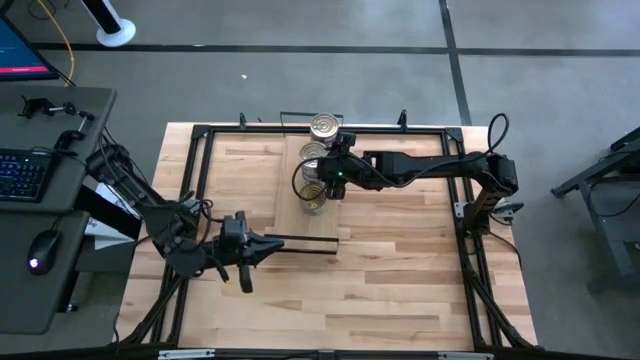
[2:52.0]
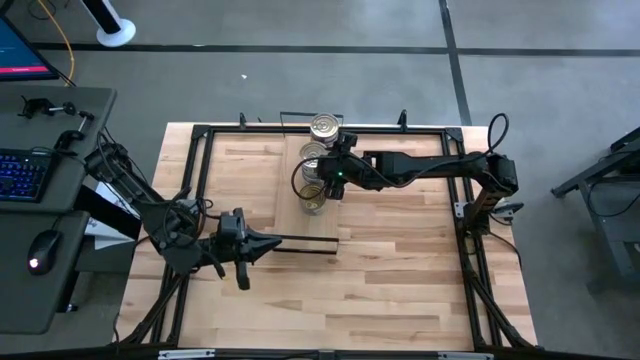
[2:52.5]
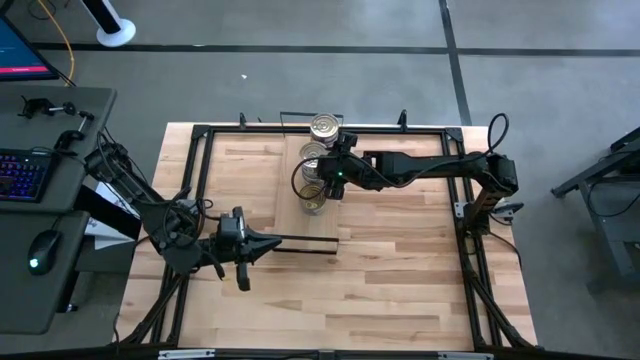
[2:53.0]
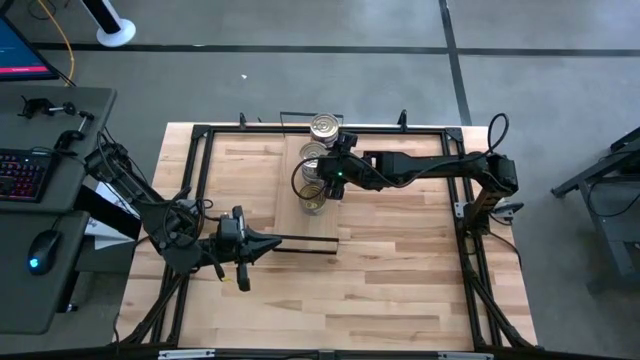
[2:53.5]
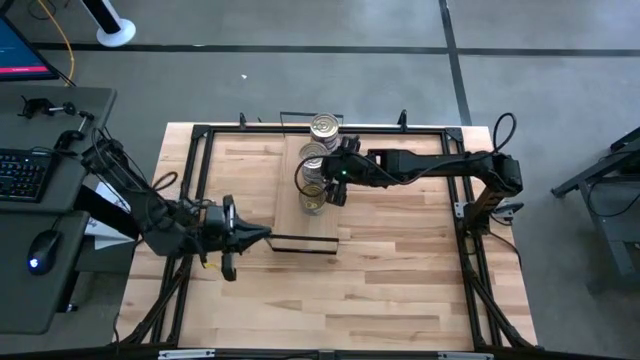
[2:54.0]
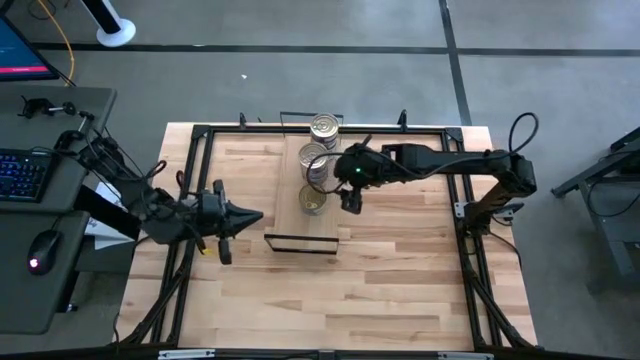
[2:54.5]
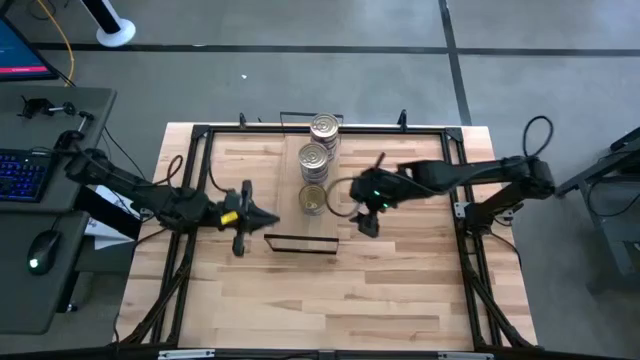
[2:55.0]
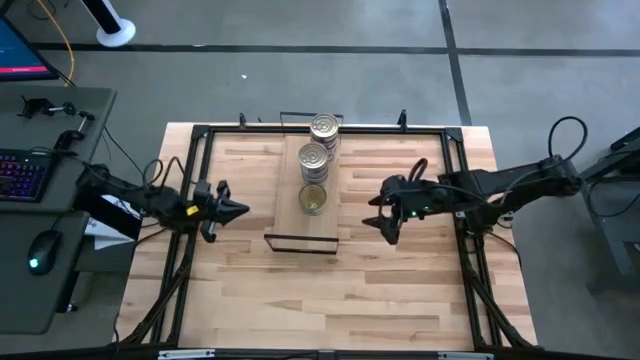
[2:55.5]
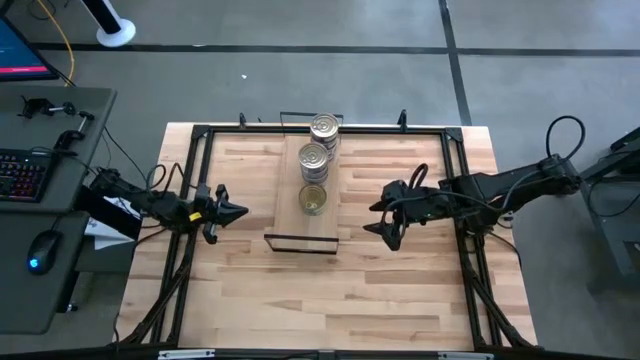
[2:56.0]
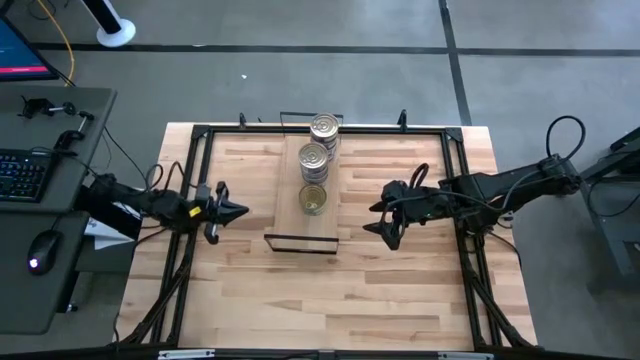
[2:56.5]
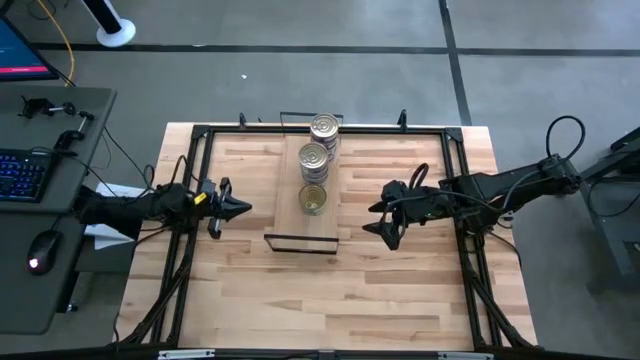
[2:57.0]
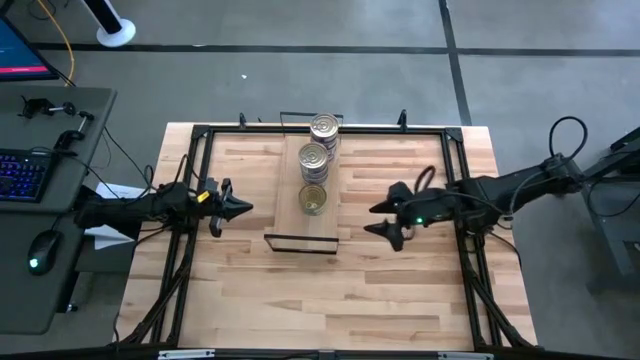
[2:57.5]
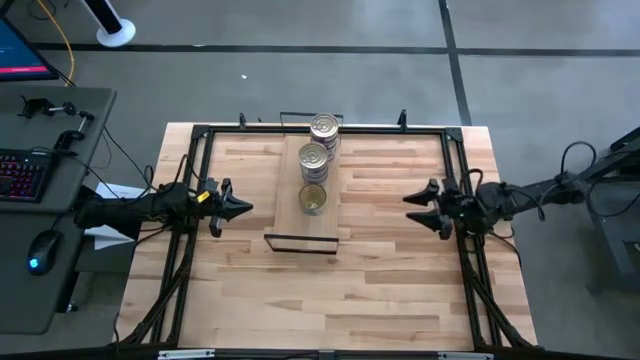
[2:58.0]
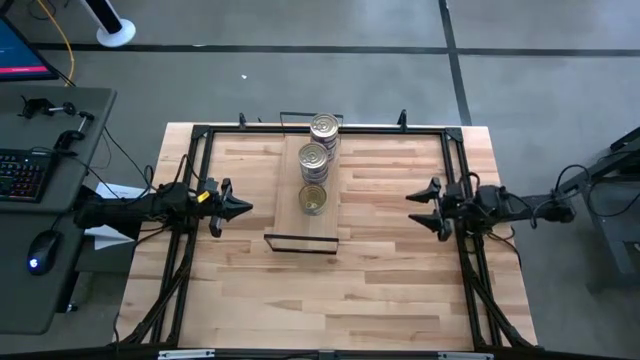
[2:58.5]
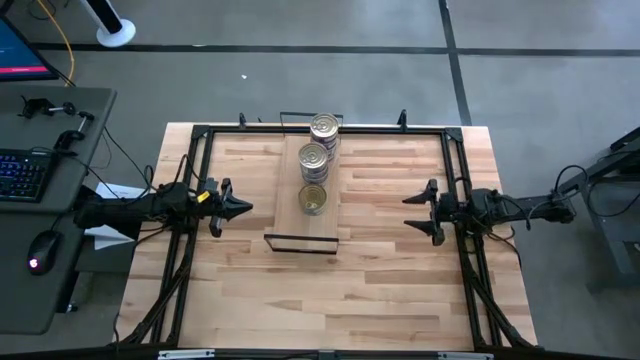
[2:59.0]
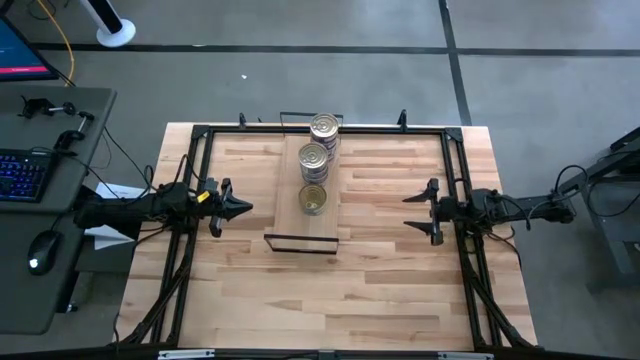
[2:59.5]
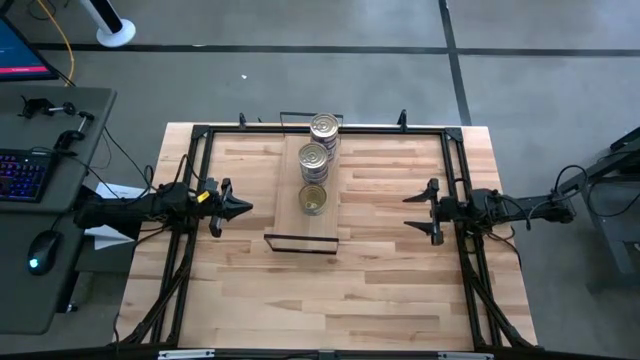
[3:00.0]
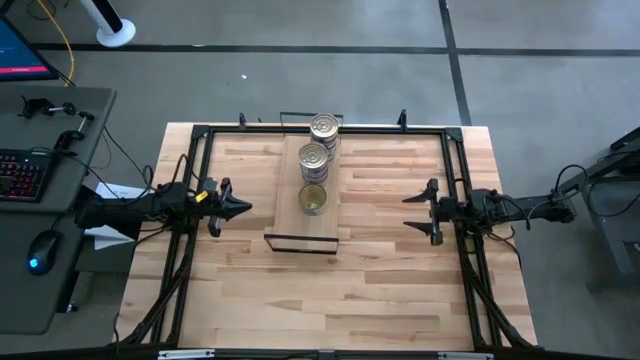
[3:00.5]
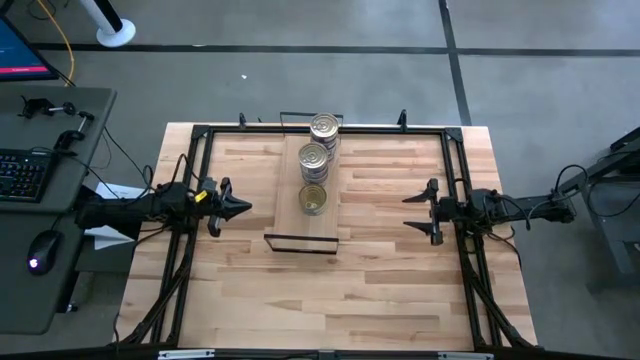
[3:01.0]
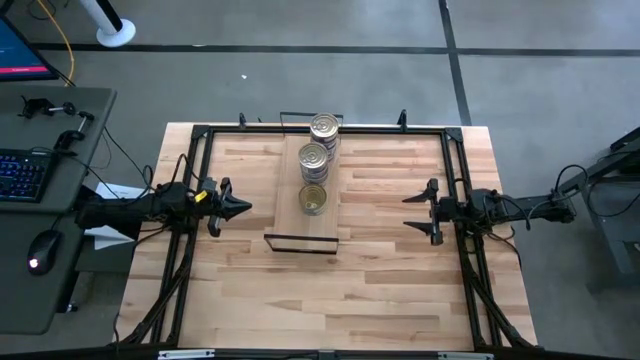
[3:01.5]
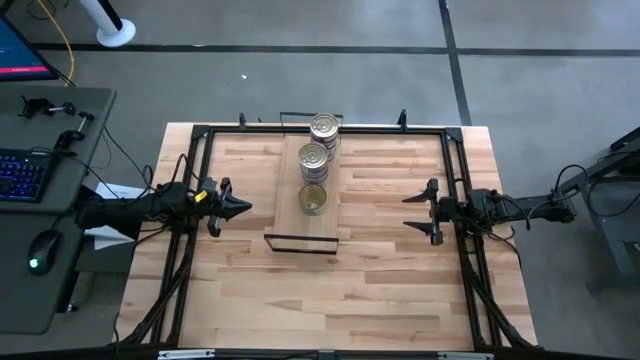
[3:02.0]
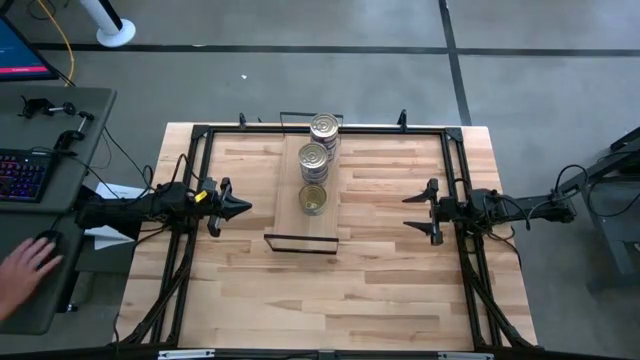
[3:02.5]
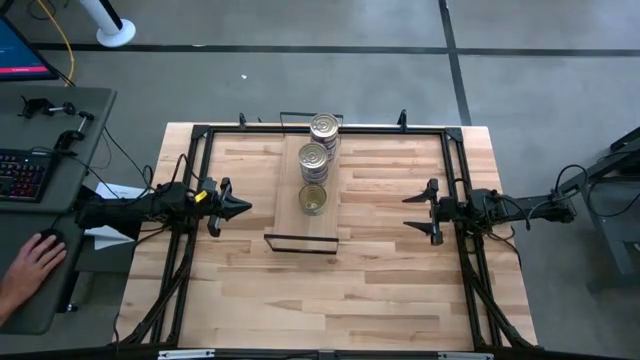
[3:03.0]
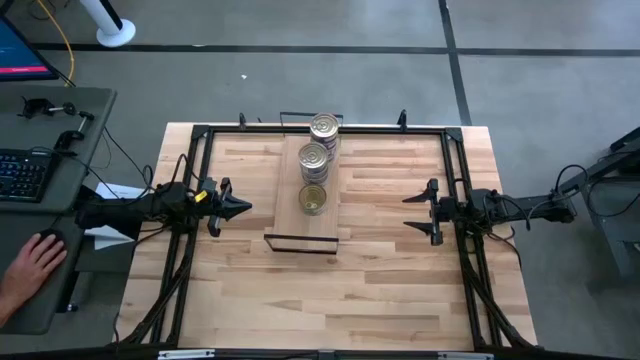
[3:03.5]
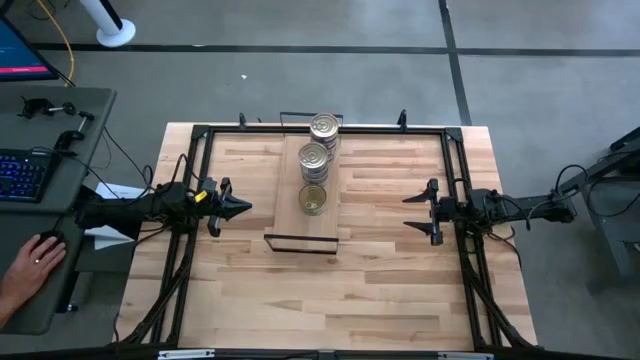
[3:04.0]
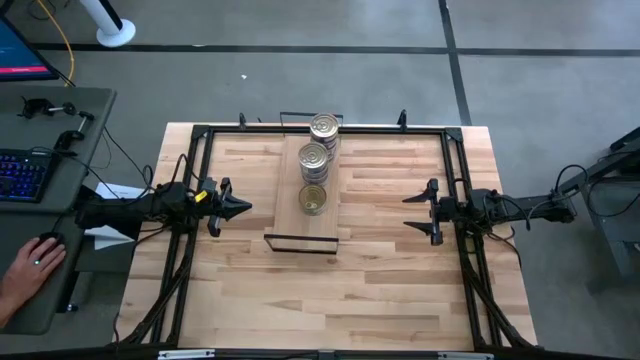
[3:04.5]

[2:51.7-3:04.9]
Task: Stack canned seafood by type on shelf
Return to Home Position

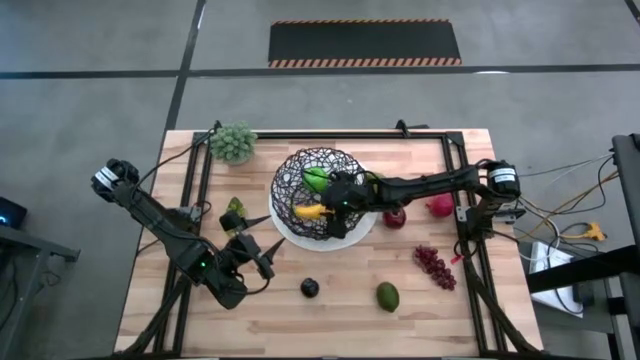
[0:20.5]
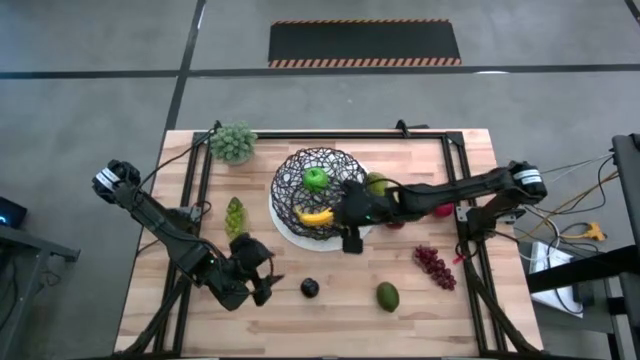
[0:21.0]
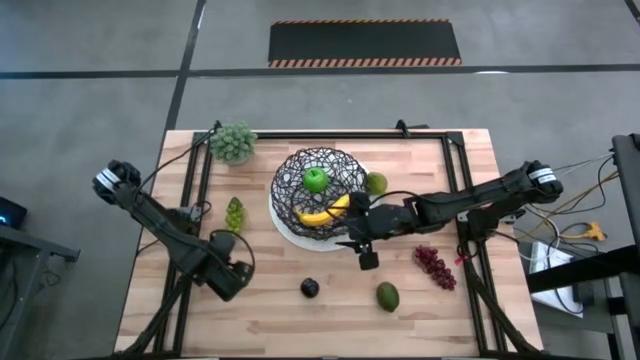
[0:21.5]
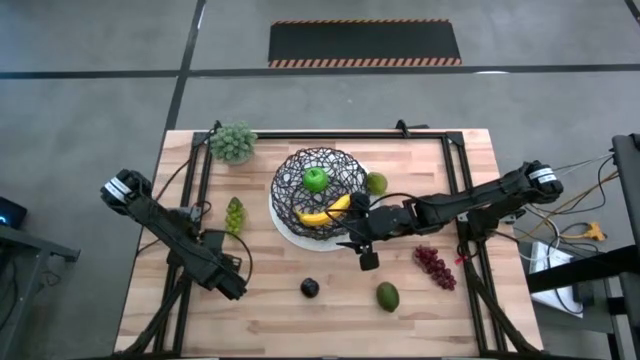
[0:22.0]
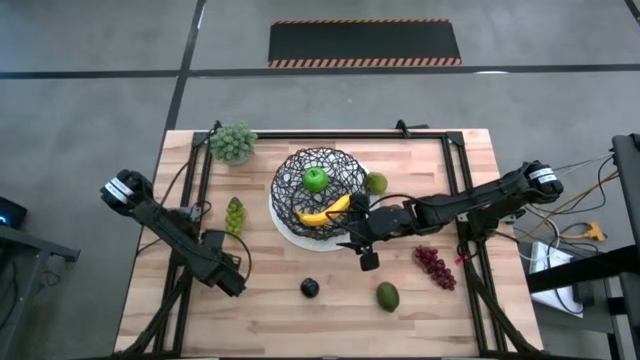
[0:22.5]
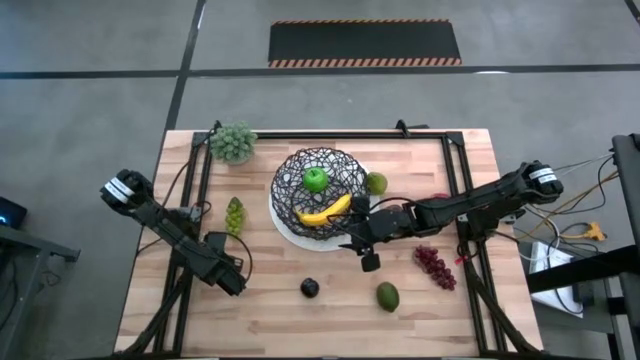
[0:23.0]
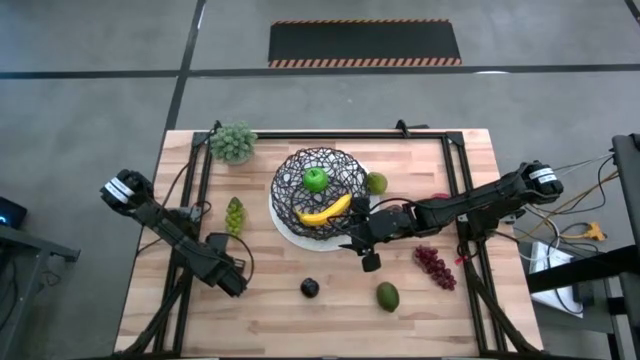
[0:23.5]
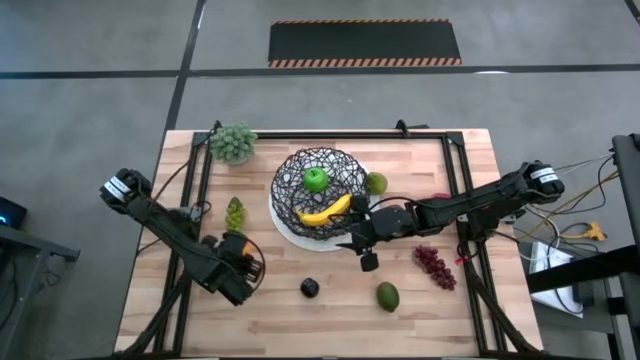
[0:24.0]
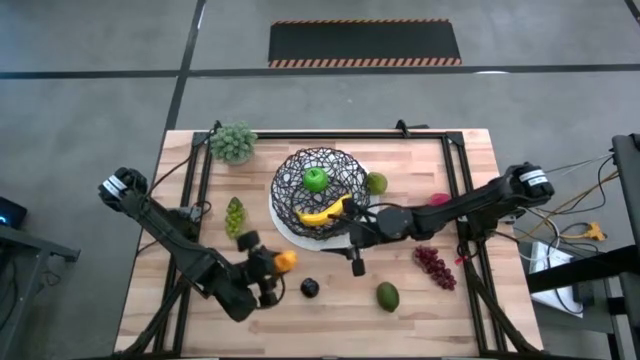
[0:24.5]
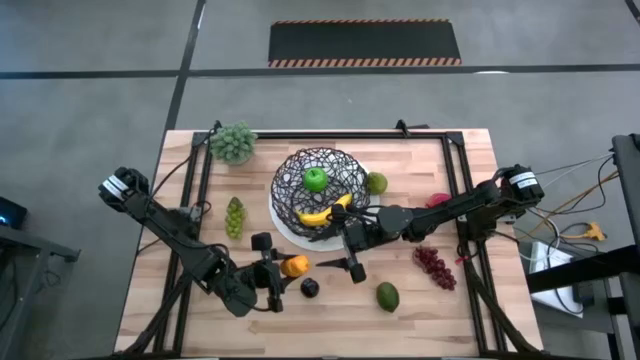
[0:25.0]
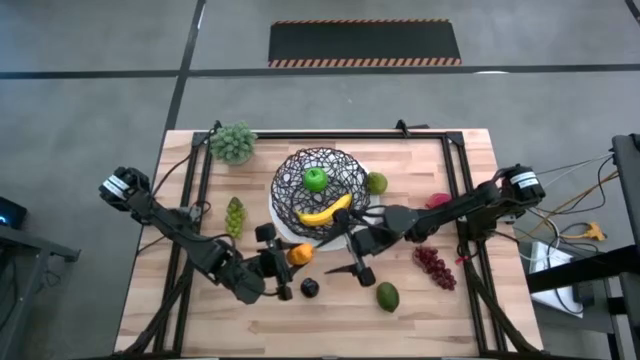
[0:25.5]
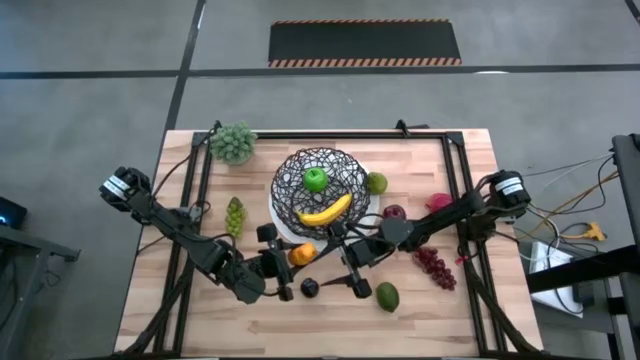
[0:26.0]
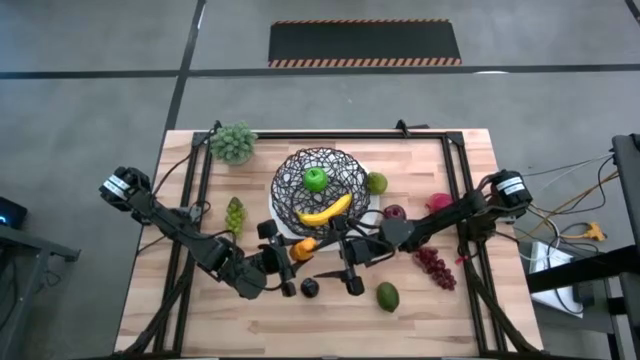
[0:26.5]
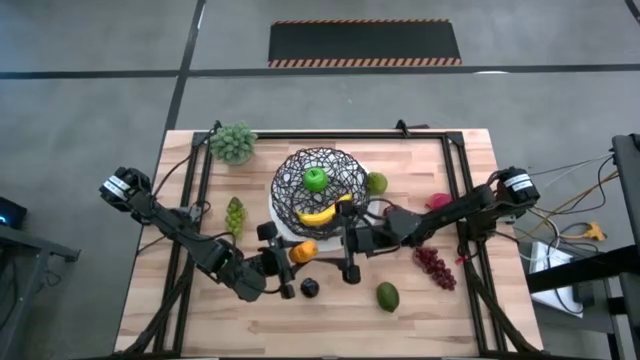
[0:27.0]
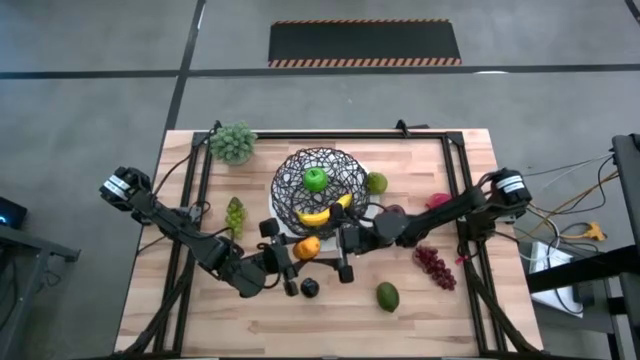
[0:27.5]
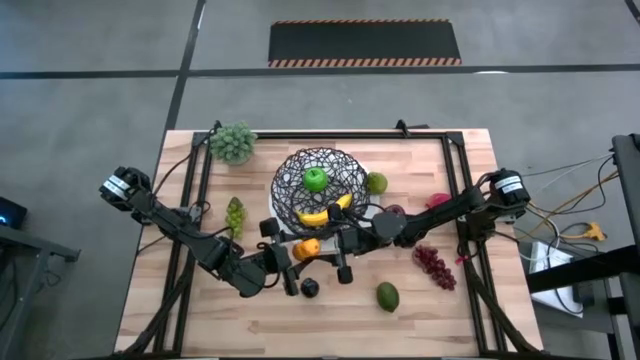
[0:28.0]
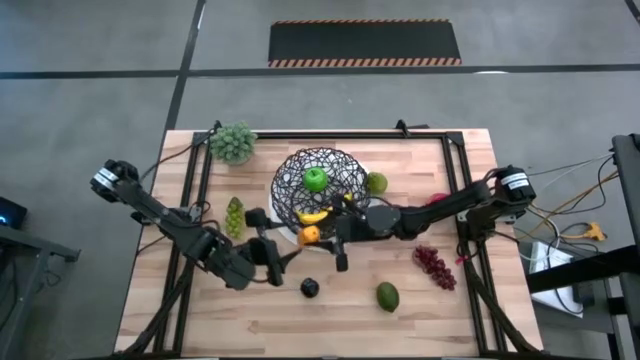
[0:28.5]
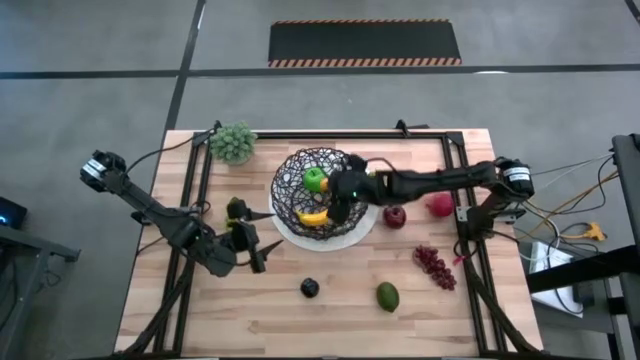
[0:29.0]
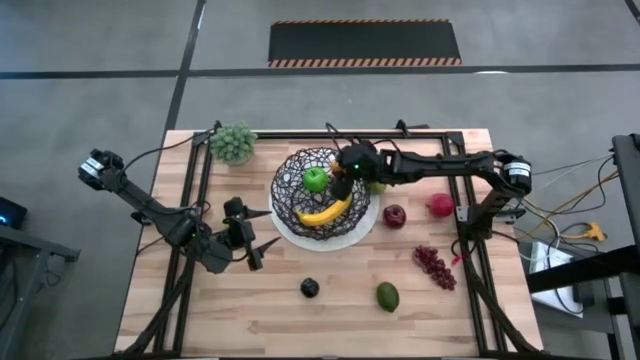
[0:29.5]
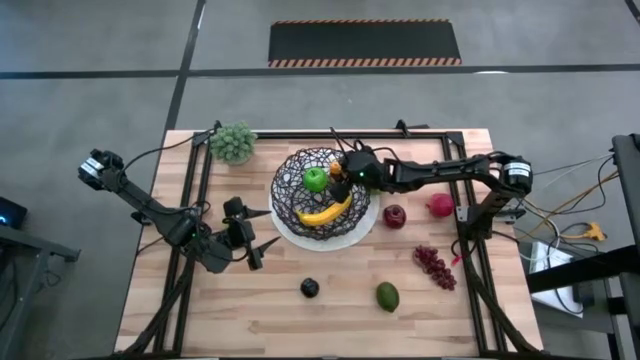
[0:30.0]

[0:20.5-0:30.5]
Task: Build produce basket
Put the mango into the wire basket
